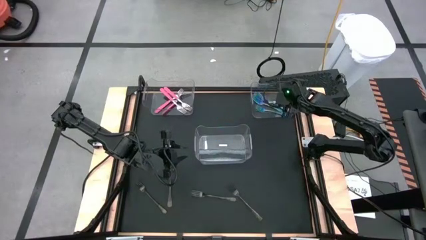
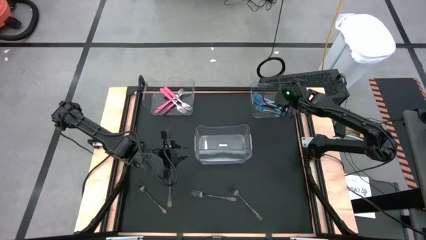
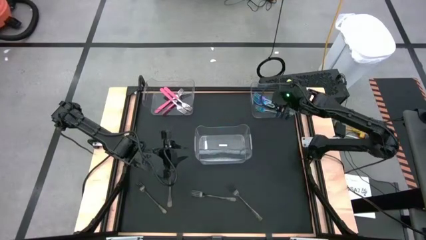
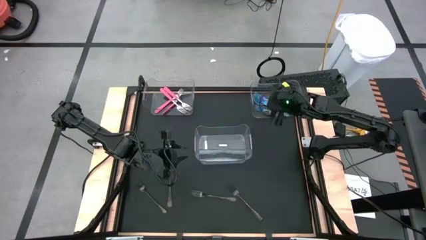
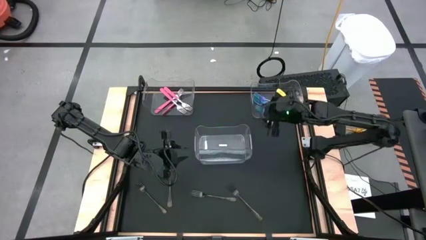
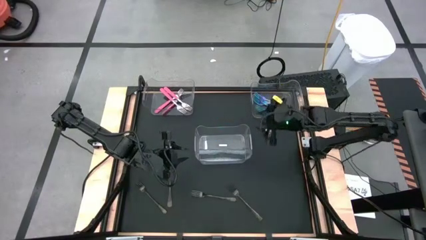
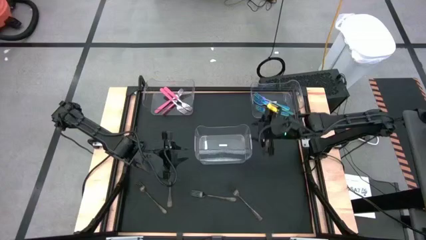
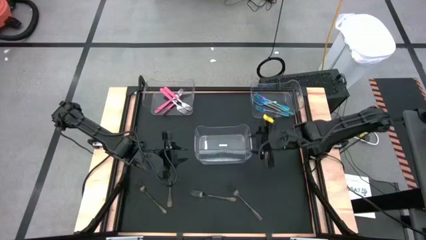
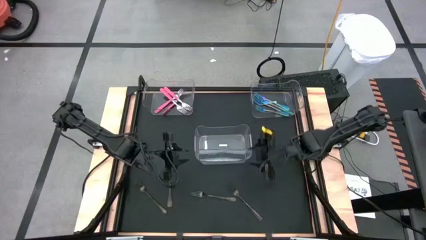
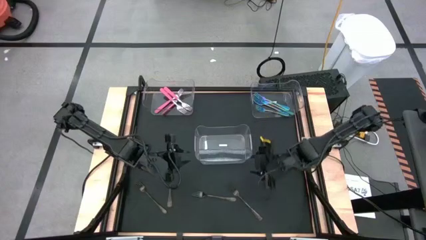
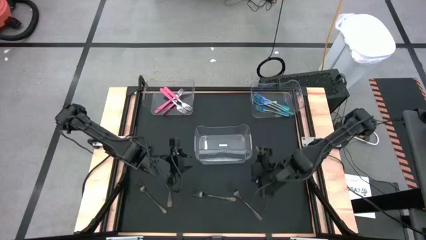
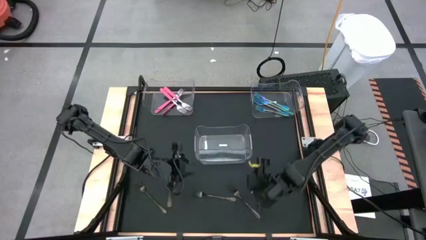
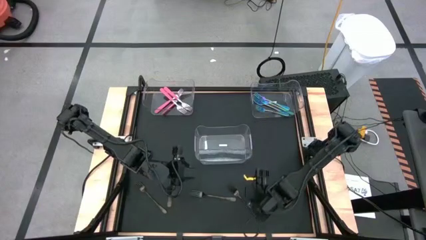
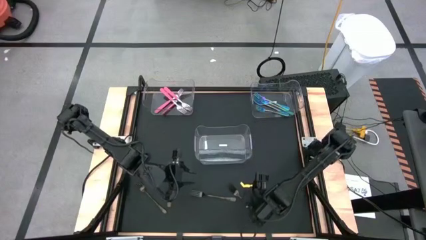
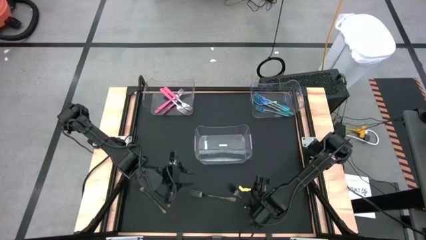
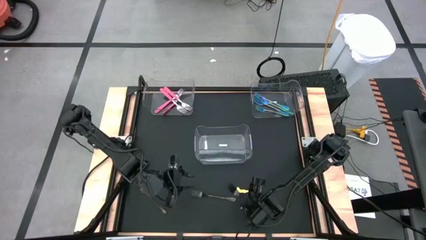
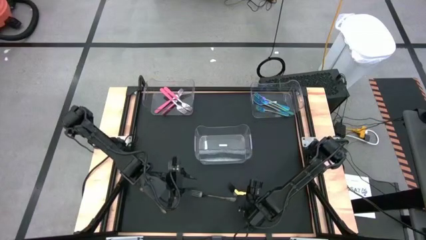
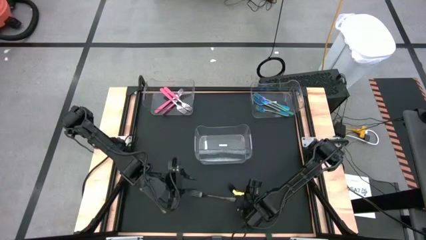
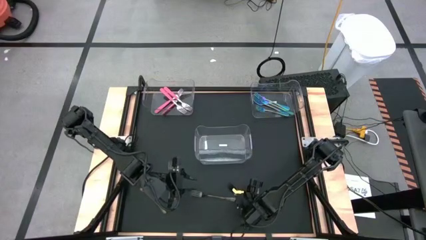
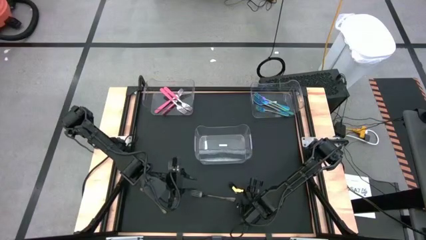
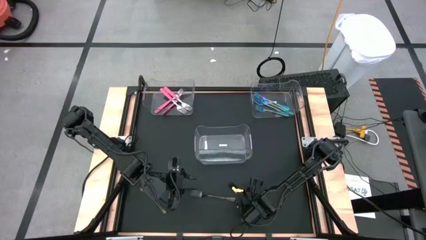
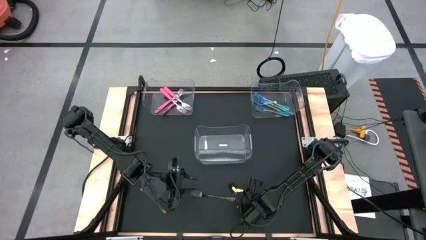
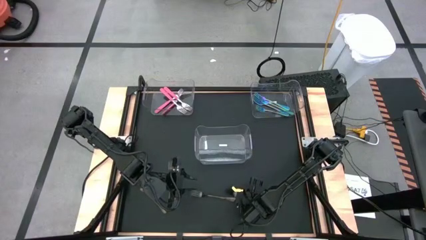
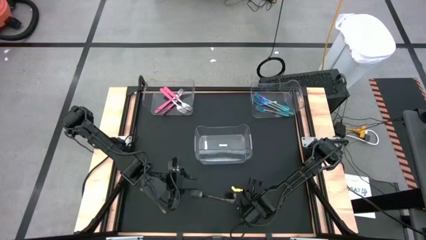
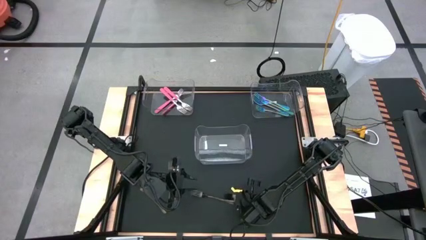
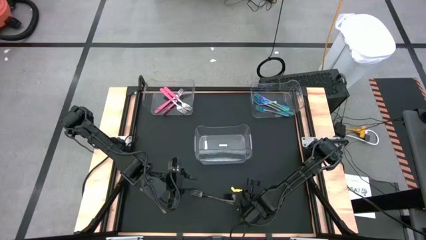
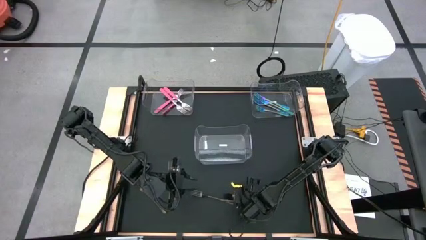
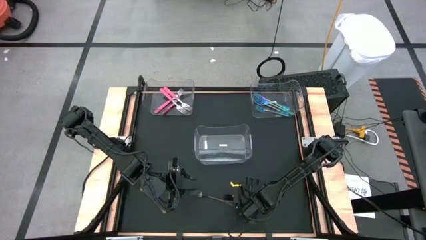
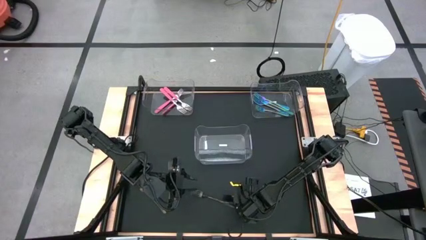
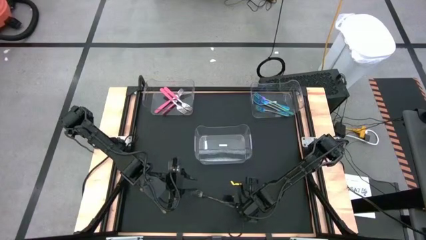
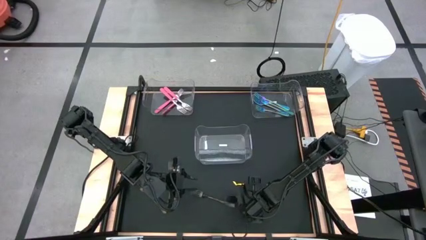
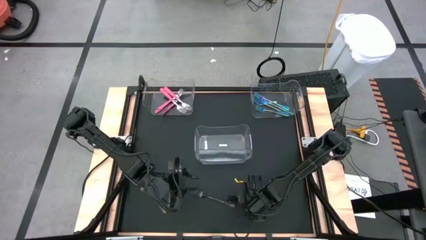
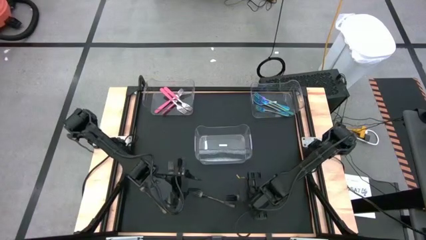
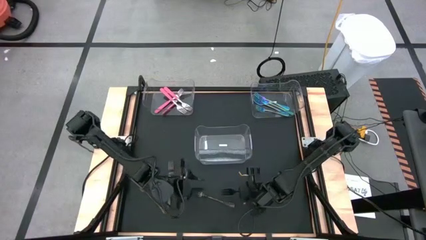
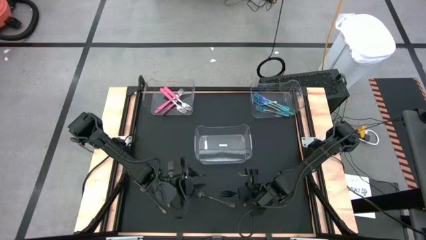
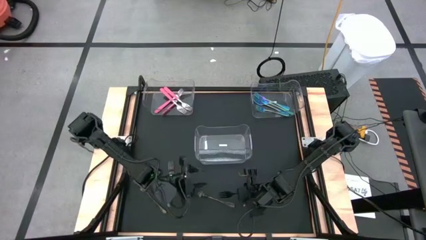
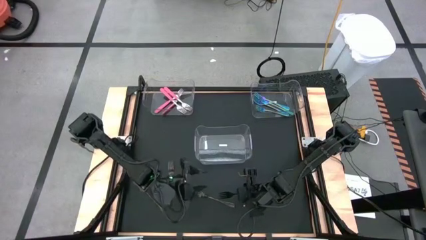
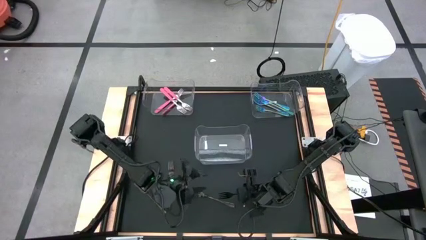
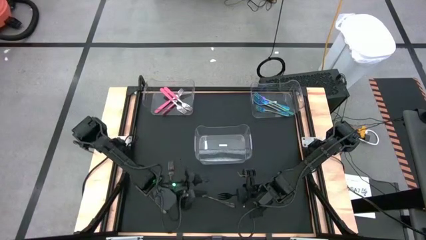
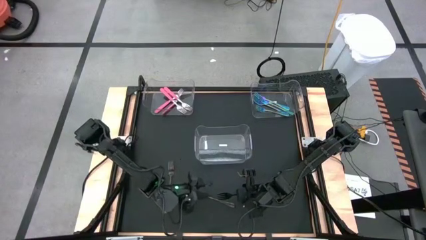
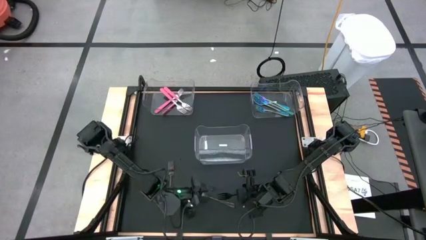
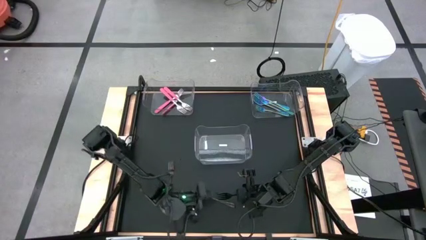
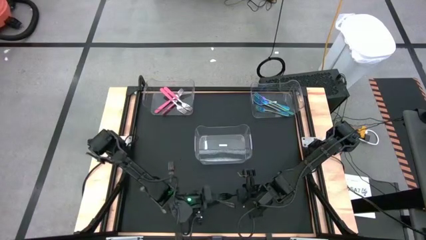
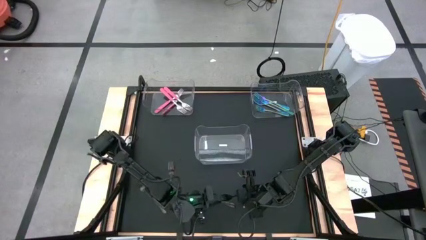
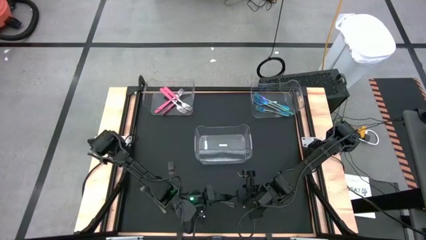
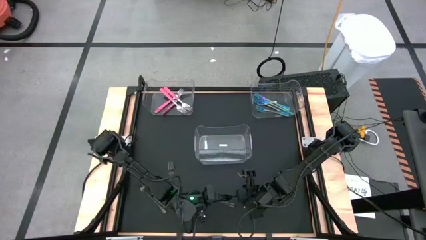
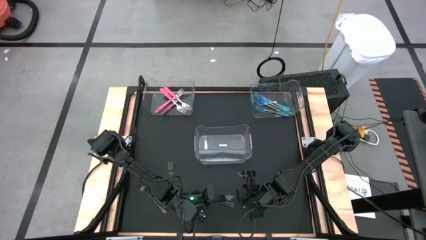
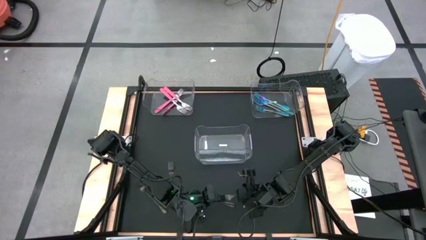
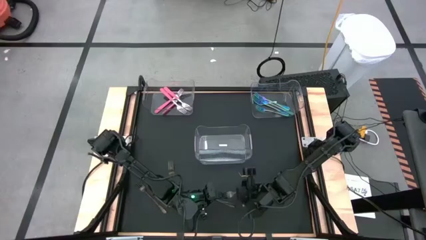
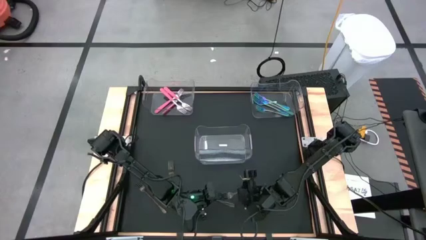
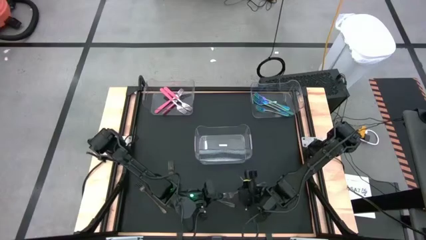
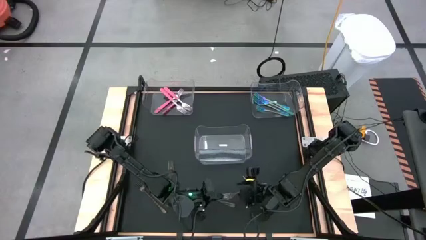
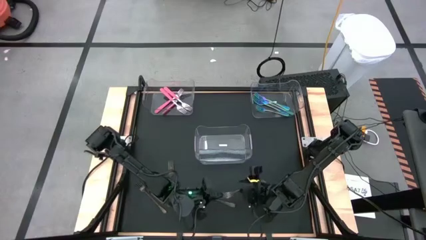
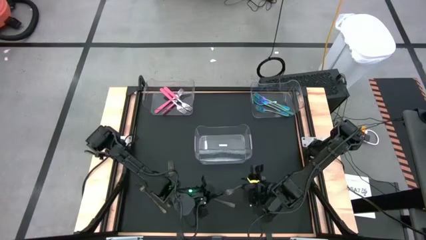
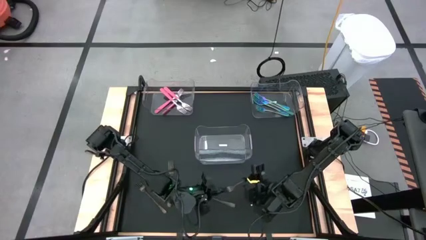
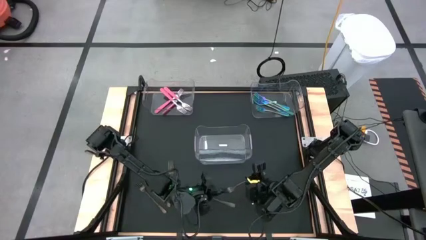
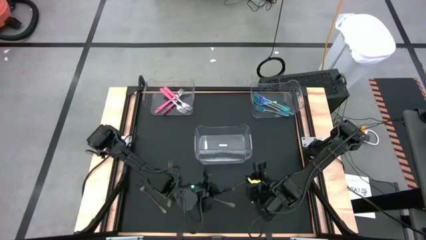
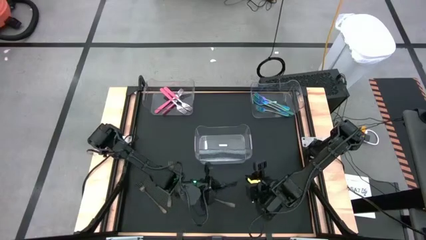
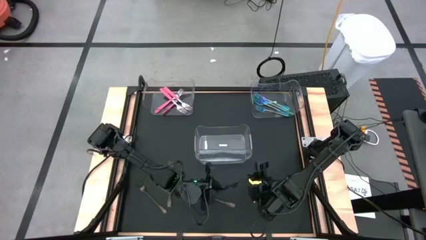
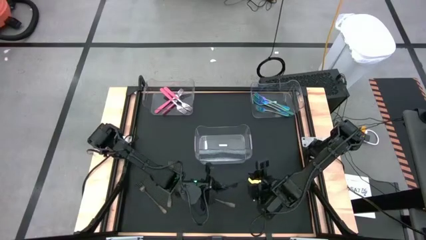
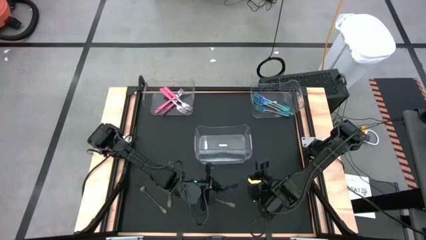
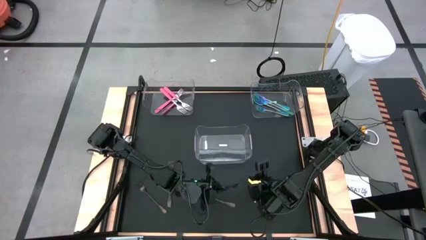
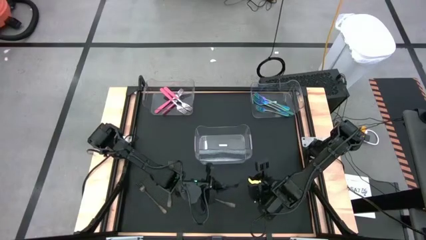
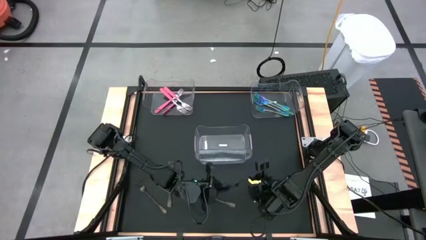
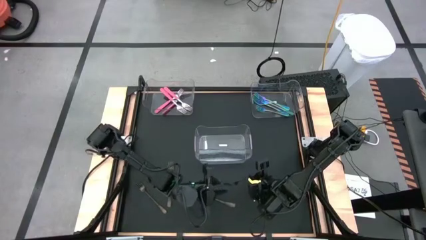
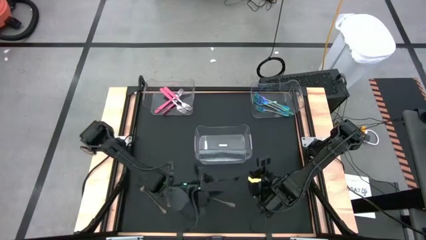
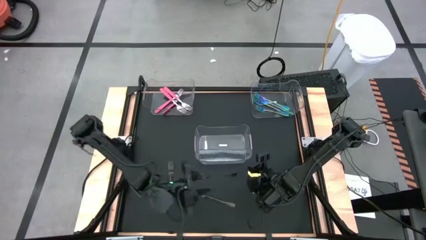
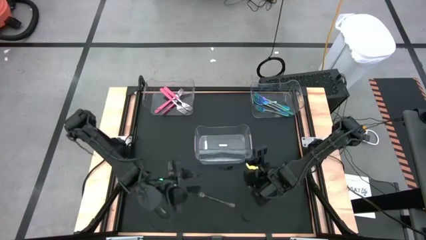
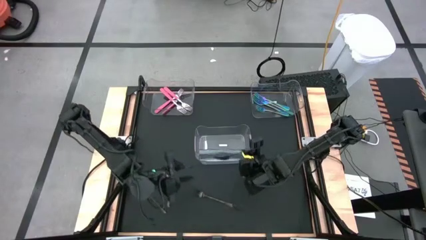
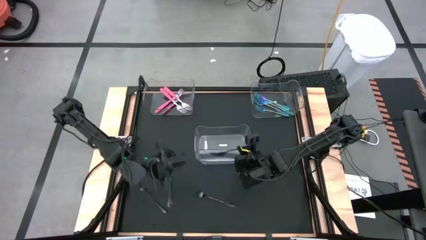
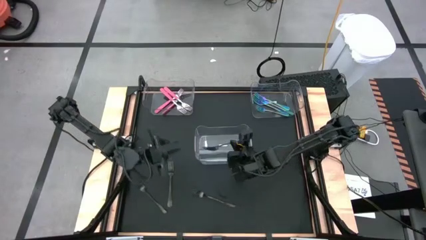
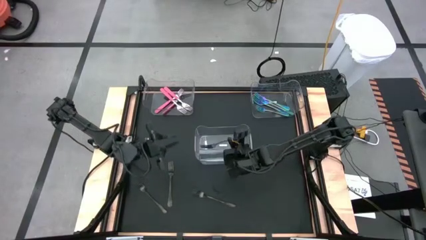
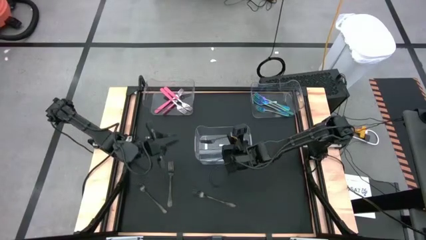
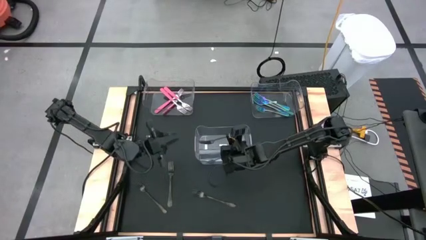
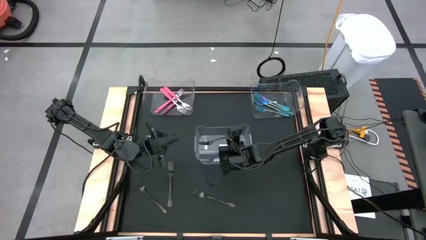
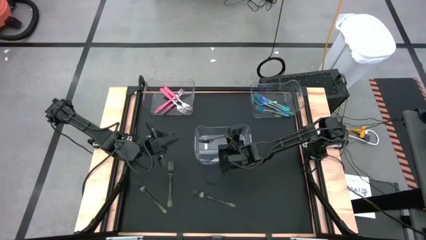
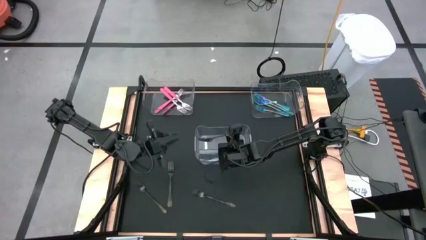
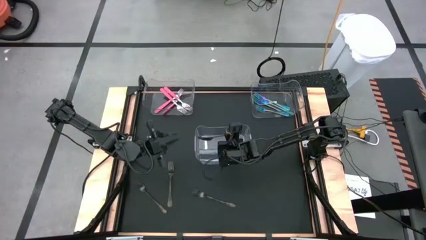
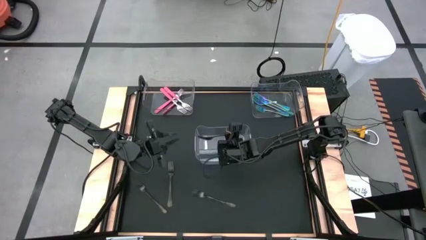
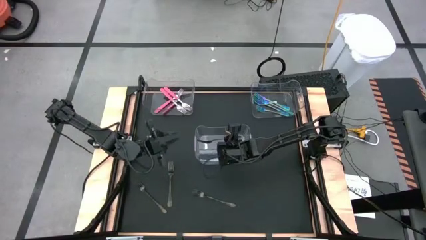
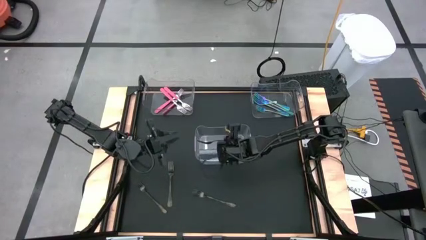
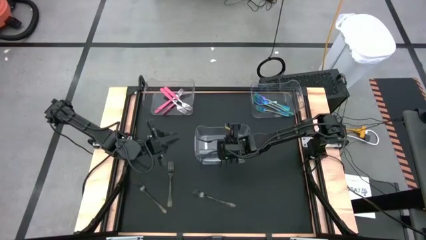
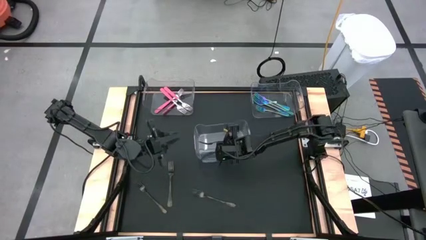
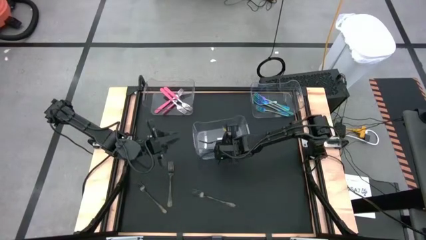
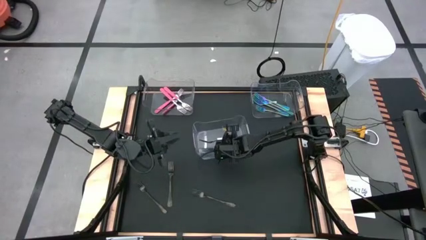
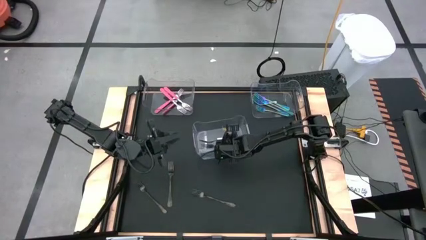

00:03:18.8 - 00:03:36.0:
Task: Sort silverware by color (type)
Put the silver fork into the middle transparent bin
